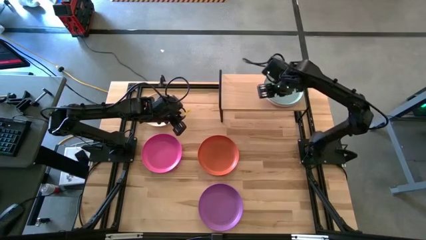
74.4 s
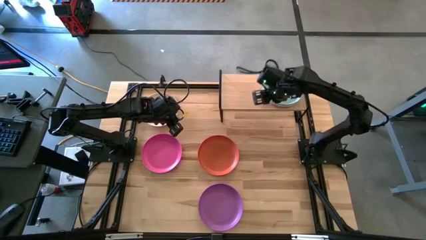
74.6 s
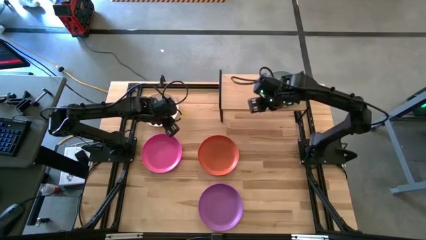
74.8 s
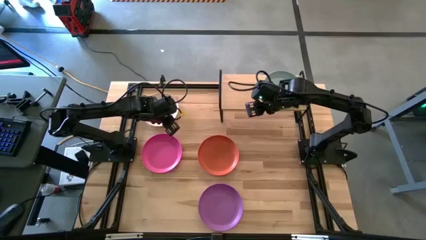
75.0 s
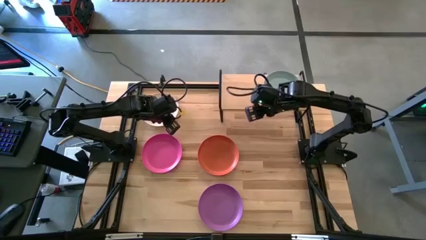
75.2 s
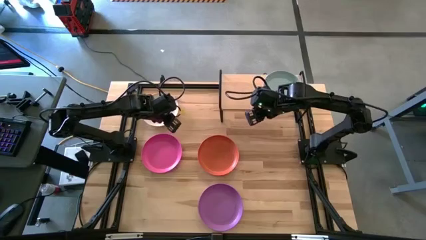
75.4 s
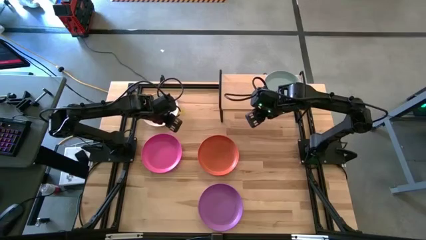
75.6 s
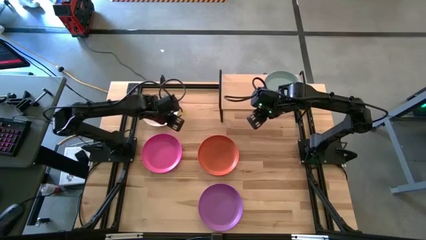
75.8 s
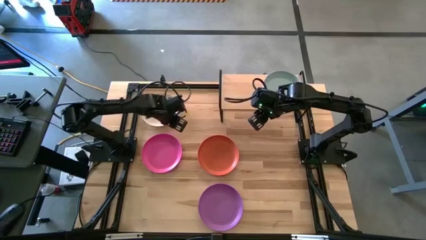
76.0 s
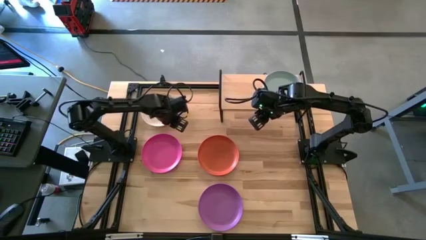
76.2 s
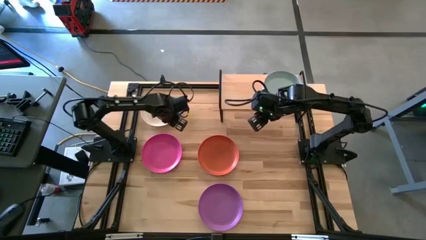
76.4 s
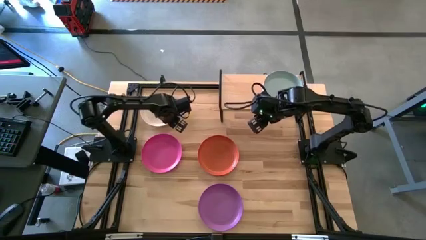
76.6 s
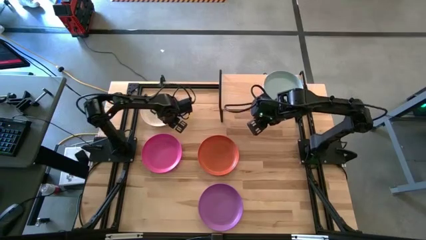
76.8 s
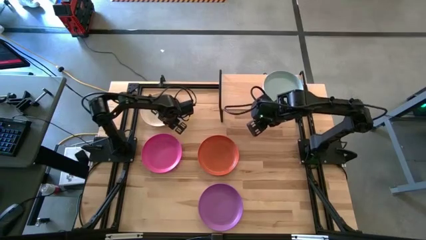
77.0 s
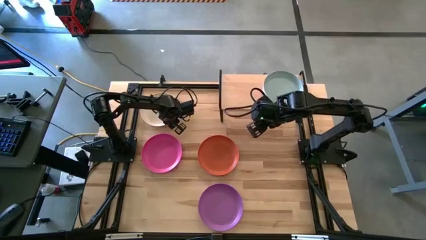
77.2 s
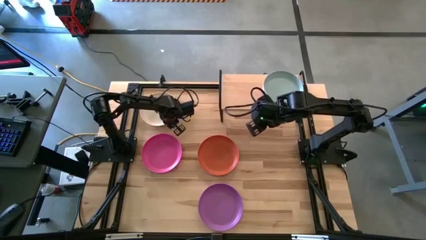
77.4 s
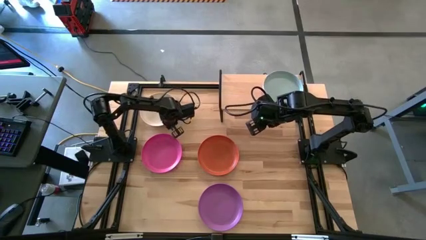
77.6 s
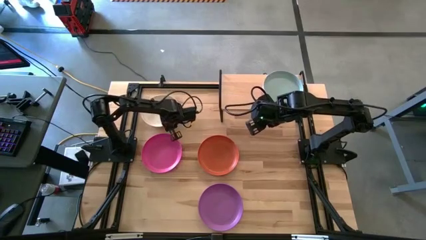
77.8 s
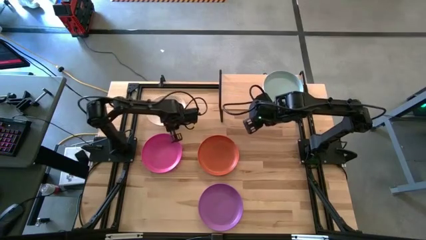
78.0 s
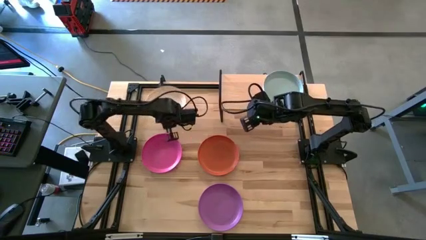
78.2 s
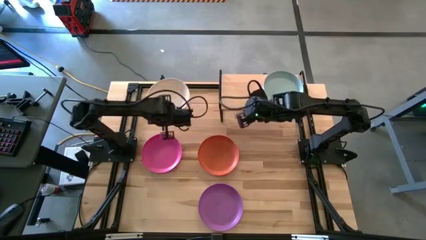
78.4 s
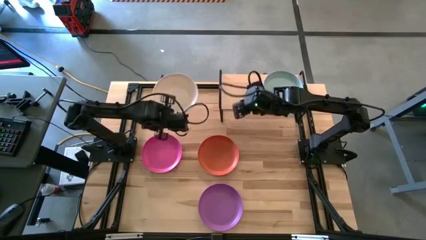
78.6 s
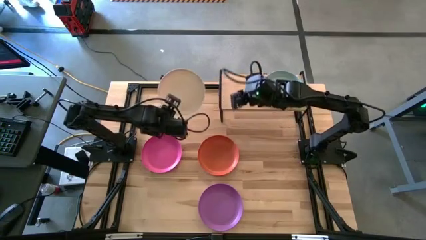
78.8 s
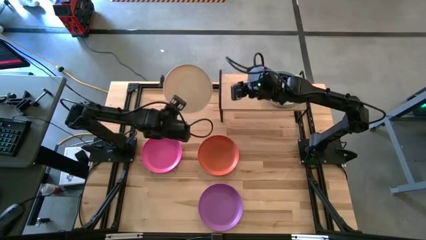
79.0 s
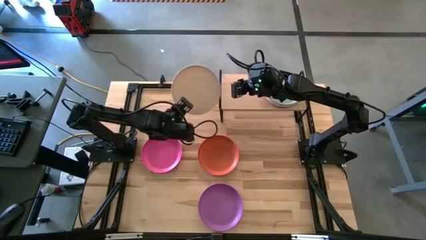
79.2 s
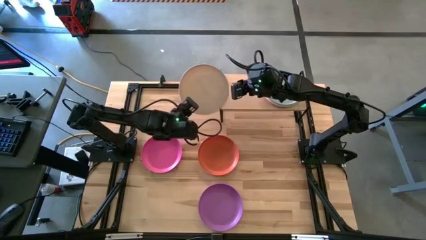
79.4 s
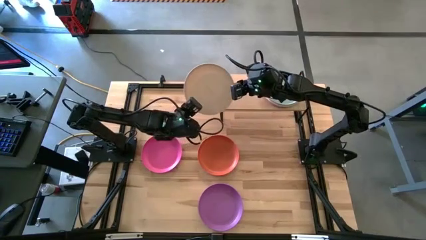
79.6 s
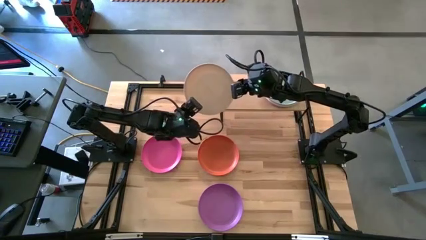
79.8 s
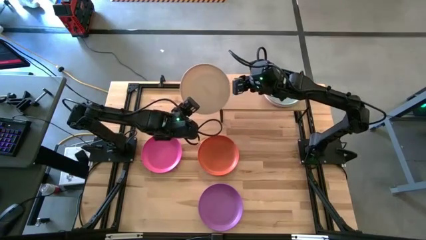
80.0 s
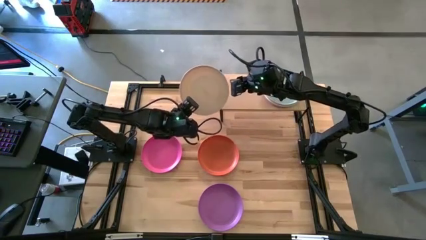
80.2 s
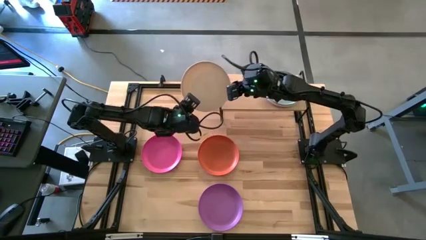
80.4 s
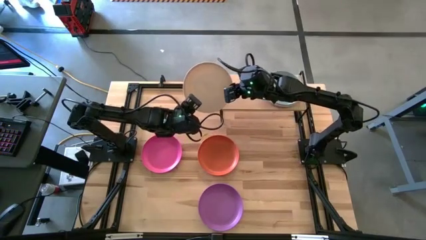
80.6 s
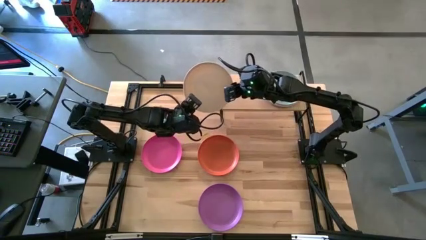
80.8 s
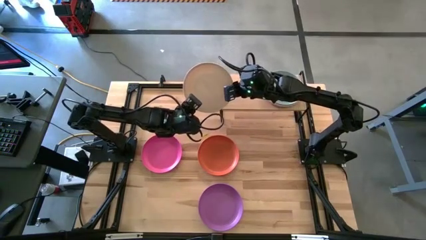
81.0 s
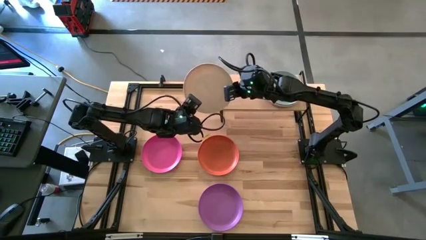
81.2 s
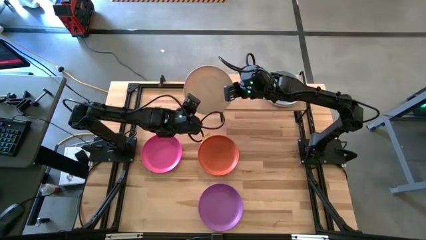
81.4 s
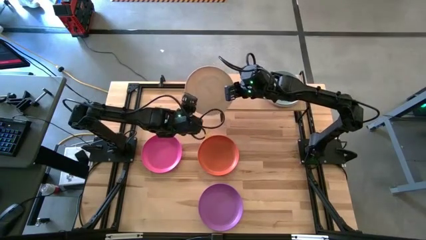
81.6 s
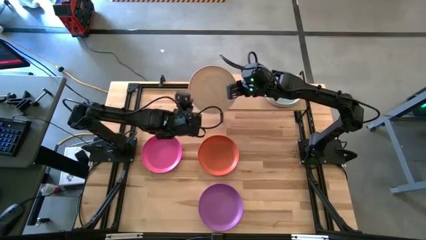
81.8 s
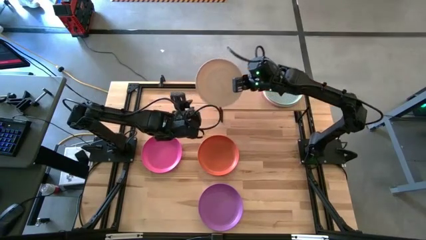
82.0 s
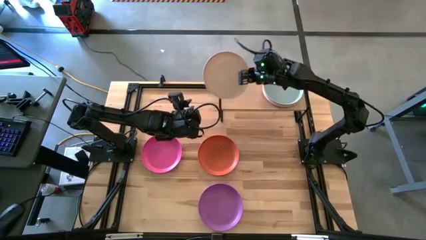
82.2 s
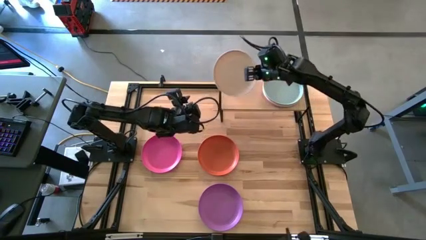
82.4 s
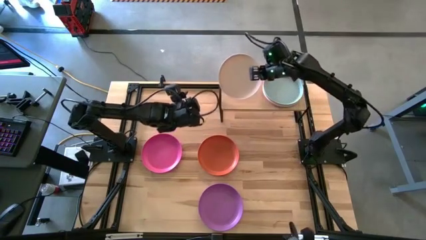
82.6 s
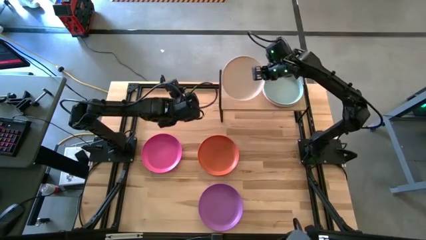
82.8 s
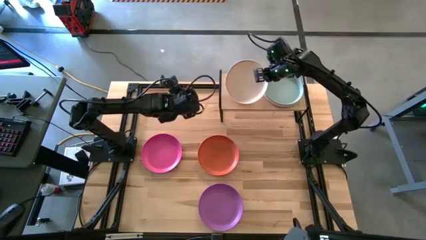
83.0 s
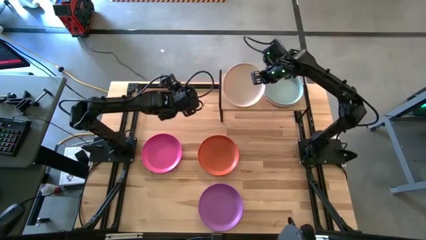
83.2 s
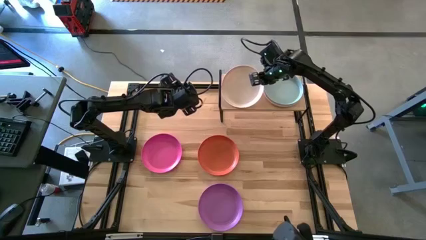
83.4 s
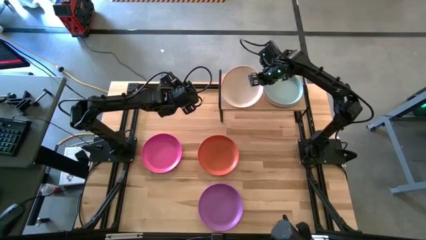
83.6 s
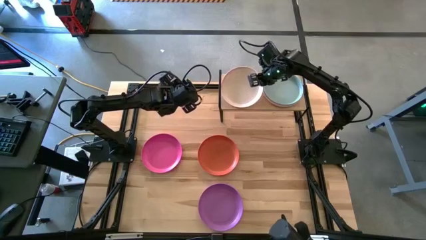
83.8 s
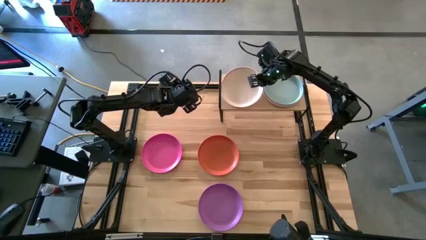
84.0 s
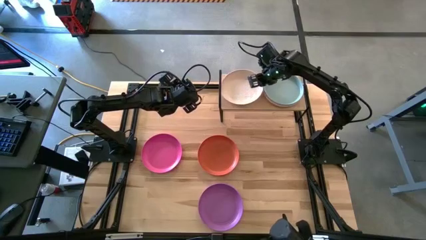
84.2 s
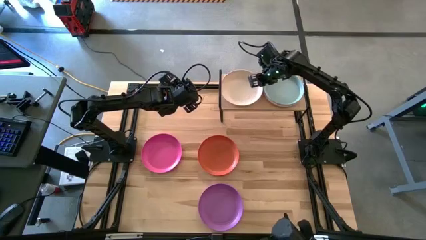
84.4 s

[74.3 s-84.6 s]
Task: Place and stack plates onto a shelf
Put the white plate on the shelf

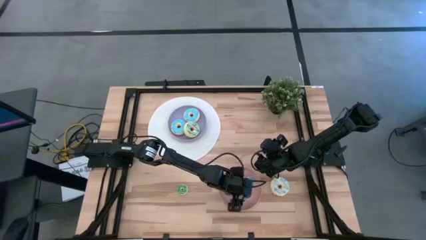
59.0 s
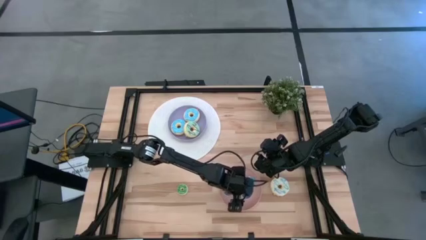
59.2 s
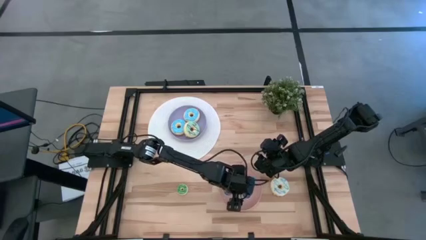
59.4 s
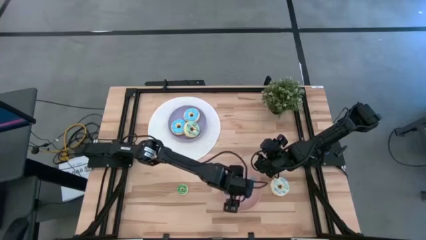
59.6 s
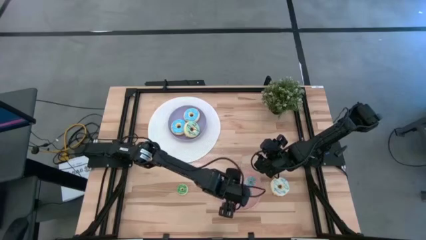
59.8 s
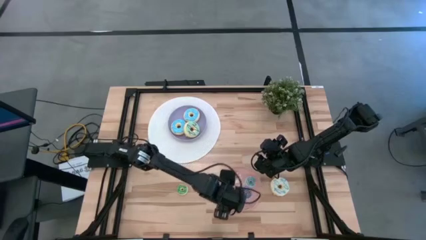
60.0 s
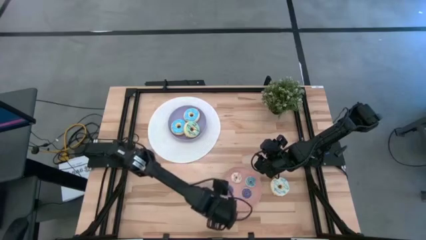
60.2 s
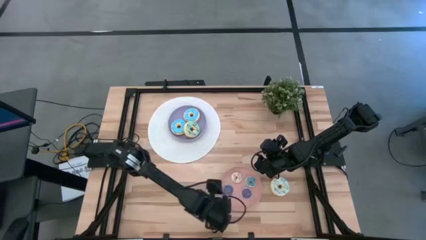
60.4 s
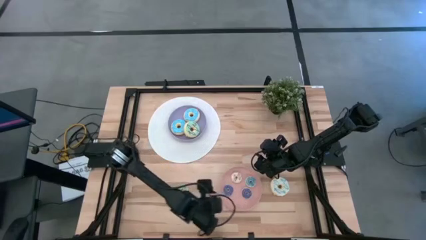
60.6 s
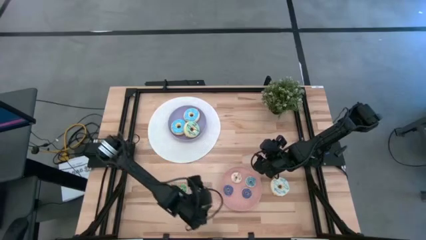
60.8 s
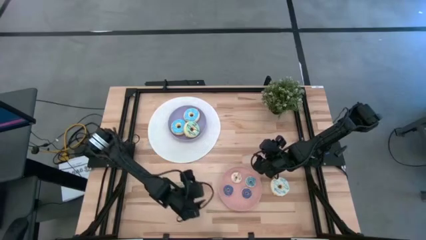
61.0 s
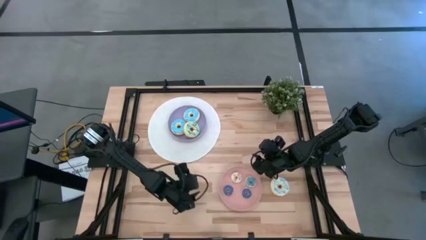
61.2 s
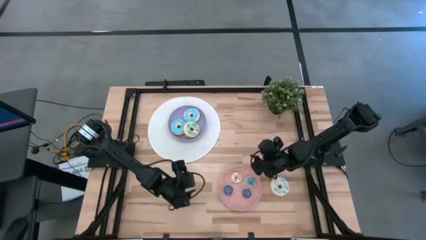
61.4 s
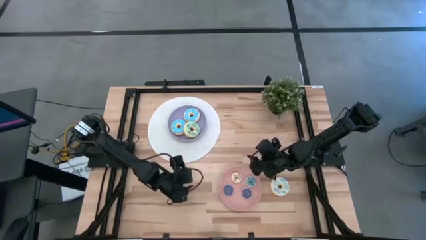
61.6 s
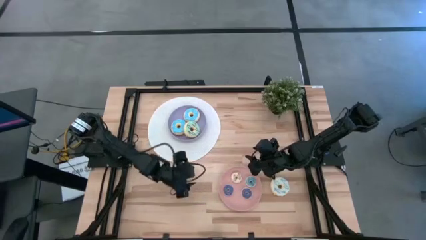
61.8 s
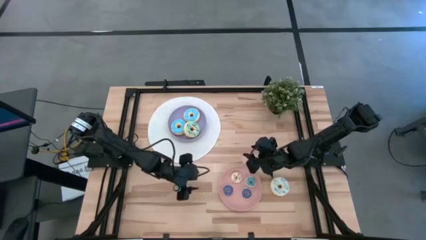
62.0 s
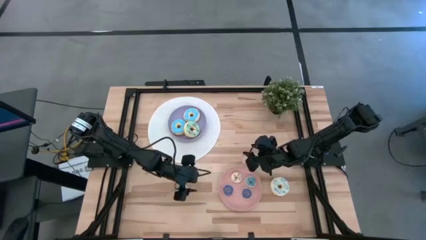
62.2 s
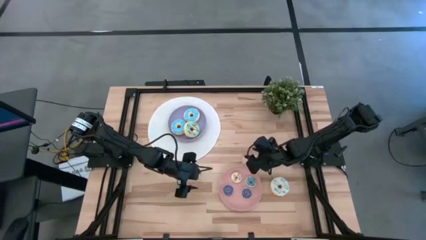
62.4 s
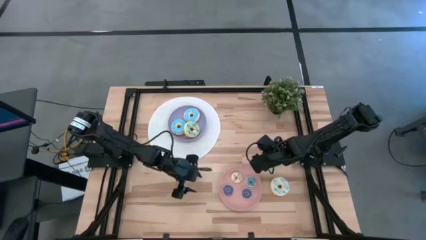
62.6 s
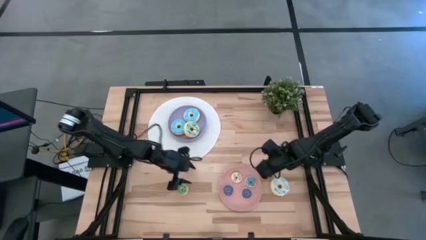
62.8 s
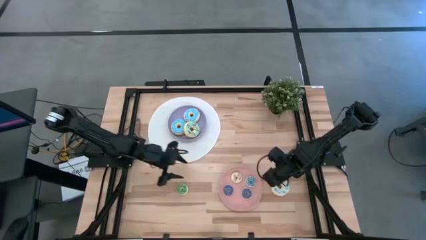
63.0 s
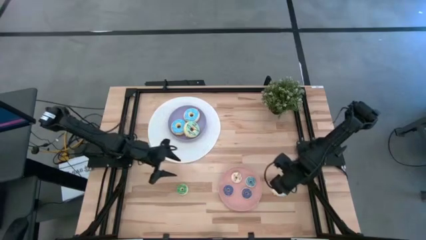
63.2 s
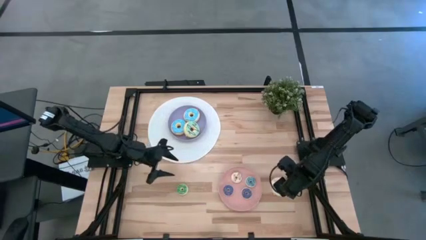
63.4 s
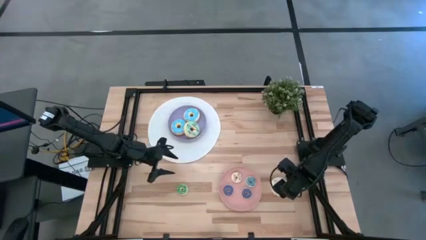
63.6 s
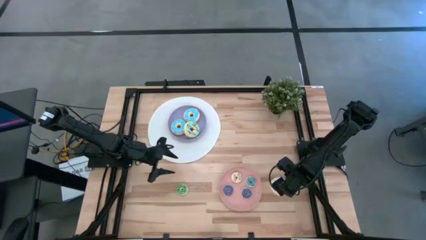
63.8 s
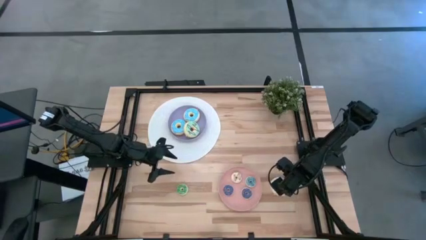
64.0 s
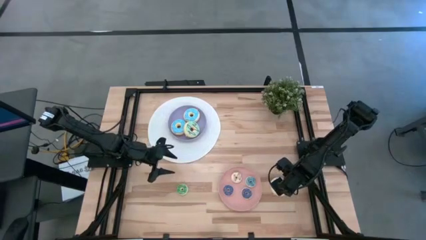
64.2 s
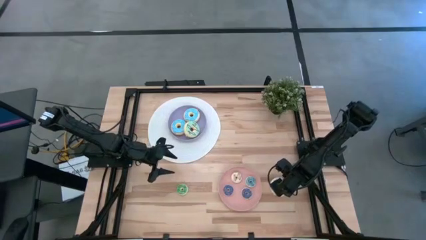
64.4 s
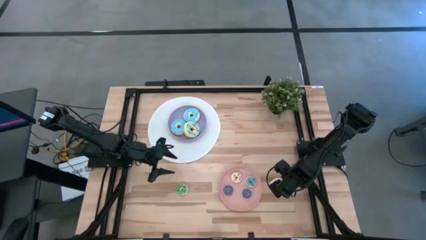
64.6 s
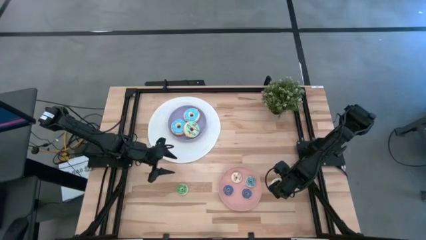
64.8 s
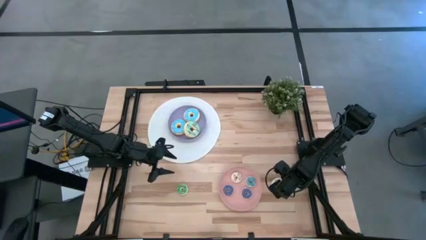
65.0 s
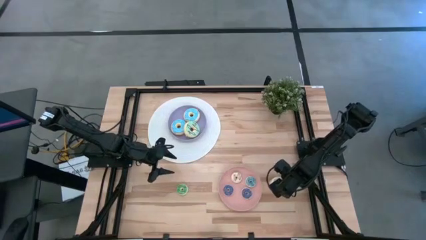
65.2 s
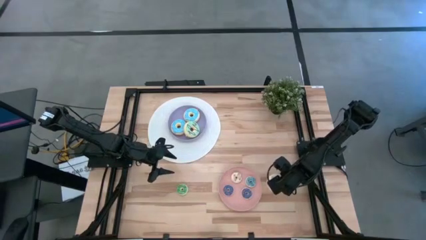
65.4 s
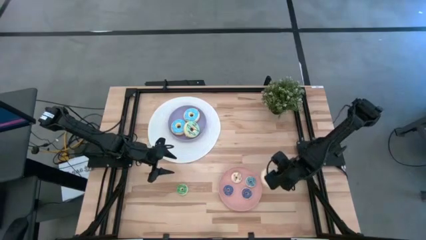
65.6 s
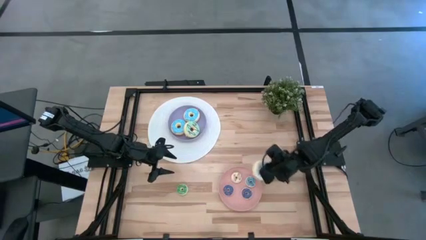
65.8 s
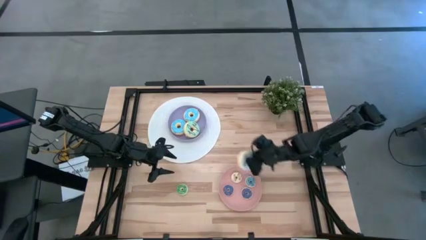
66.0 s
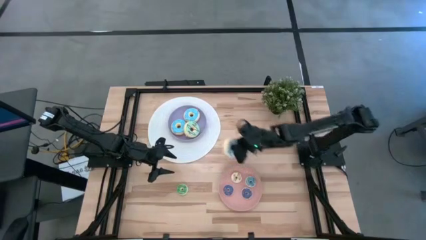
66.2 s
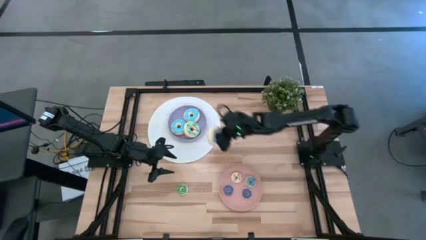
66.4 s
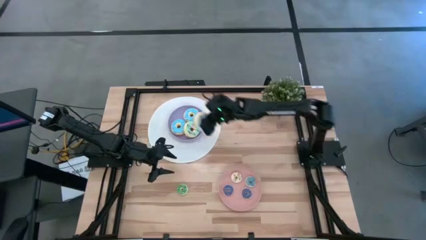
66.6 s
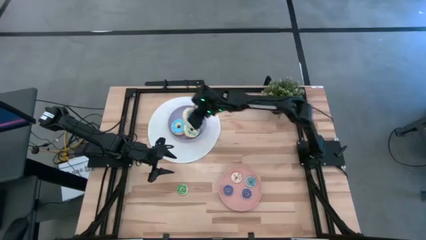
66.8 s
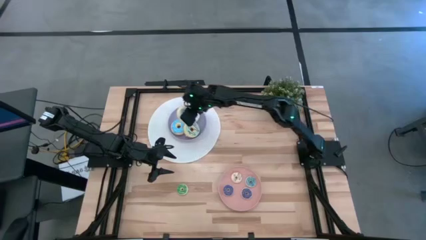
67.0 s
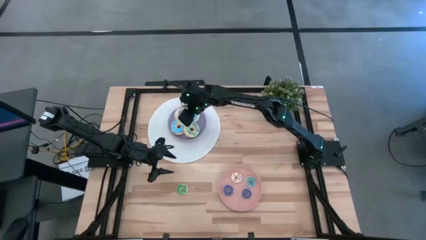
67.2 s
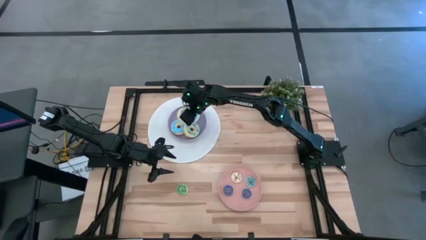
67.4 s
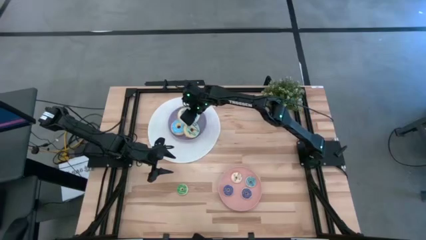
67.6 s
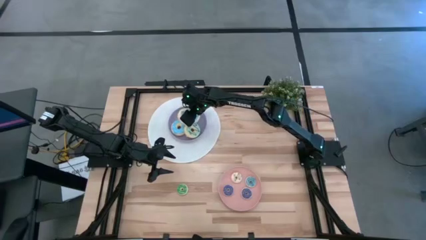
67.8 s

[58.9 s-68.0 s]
Task: Pick & Place donuts
Put the big white donut on the purple plate
